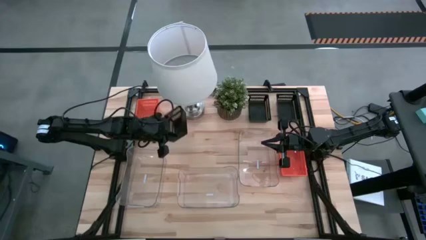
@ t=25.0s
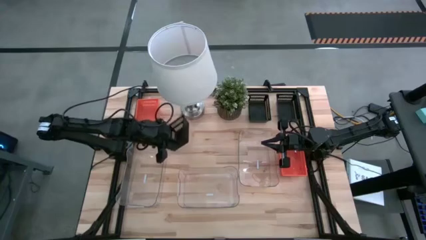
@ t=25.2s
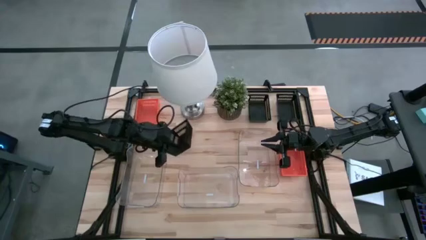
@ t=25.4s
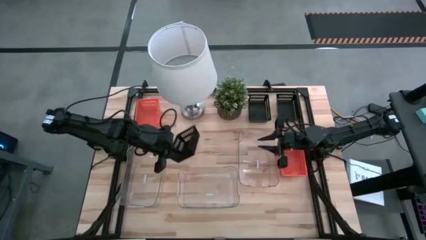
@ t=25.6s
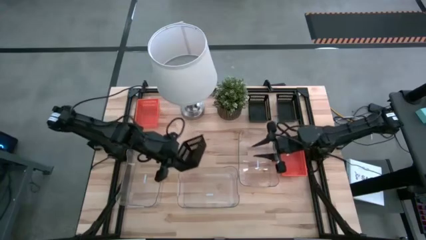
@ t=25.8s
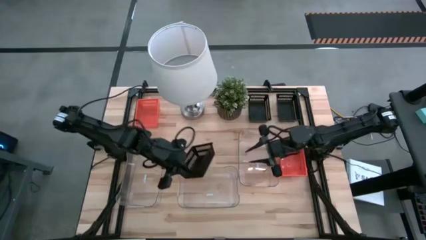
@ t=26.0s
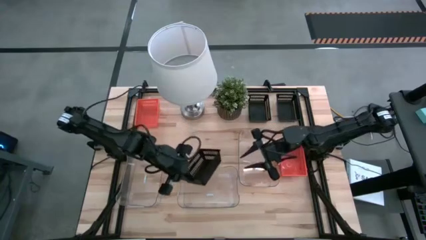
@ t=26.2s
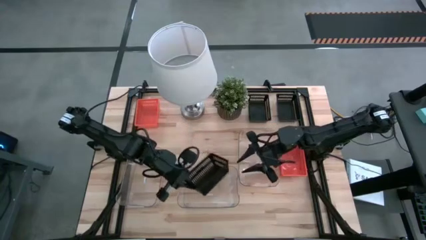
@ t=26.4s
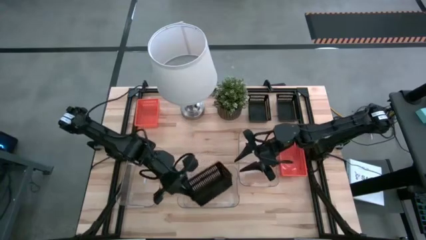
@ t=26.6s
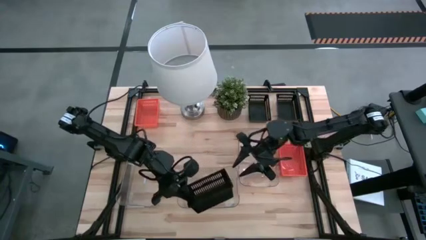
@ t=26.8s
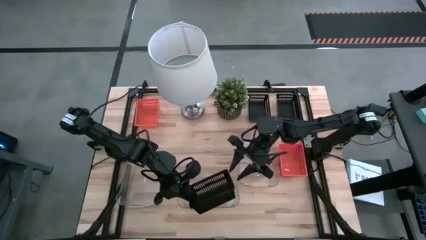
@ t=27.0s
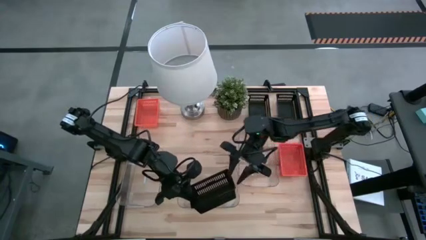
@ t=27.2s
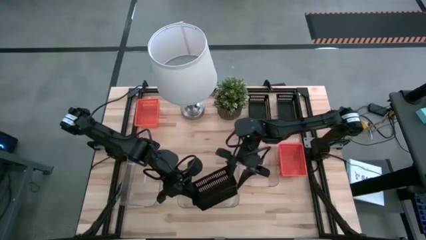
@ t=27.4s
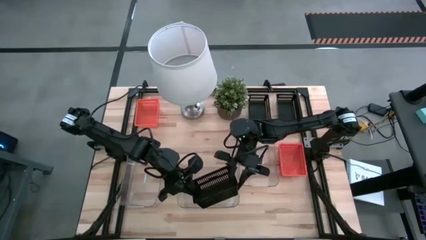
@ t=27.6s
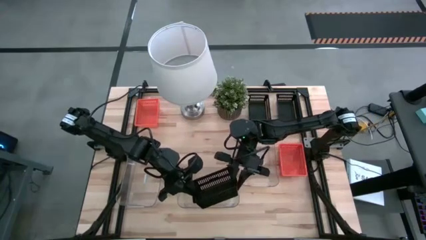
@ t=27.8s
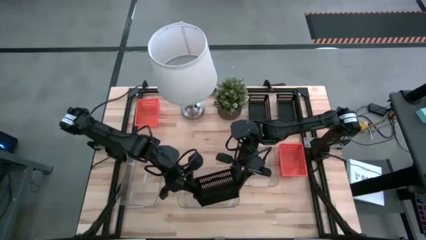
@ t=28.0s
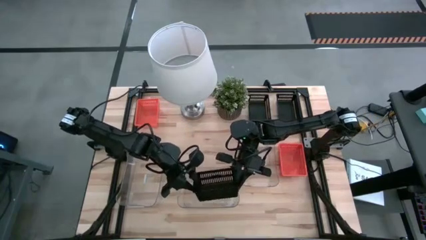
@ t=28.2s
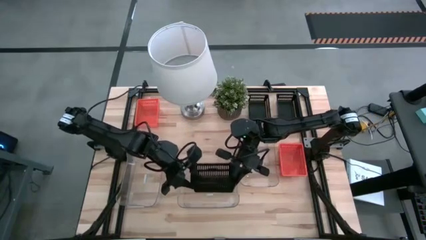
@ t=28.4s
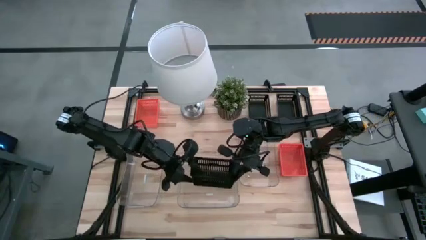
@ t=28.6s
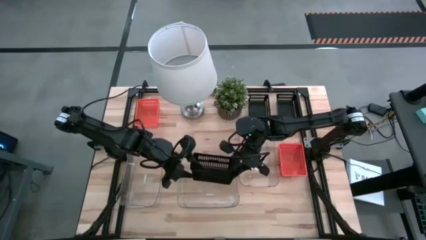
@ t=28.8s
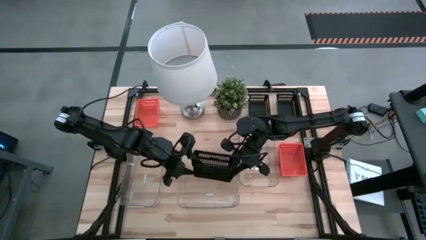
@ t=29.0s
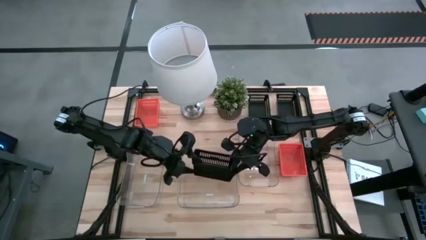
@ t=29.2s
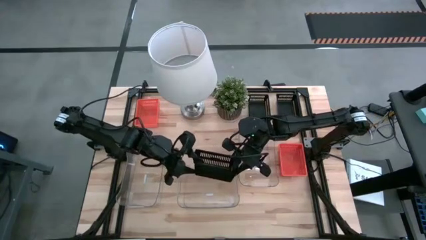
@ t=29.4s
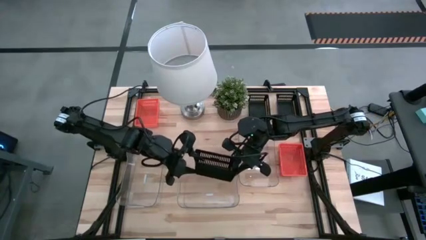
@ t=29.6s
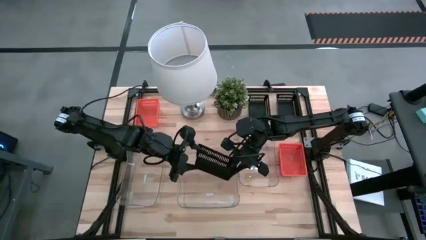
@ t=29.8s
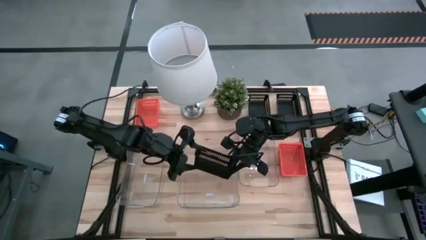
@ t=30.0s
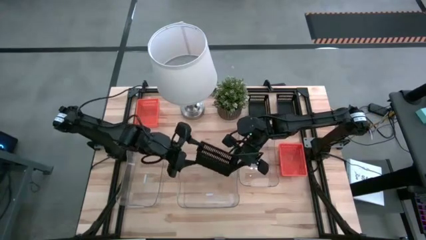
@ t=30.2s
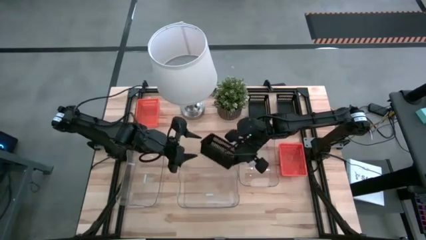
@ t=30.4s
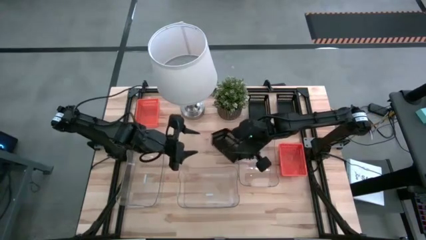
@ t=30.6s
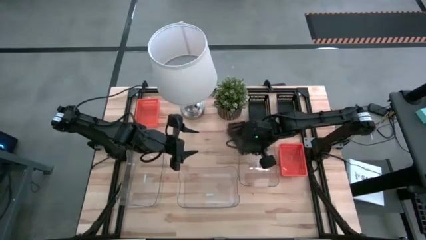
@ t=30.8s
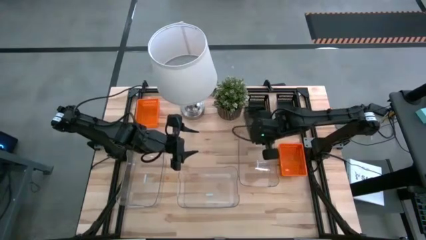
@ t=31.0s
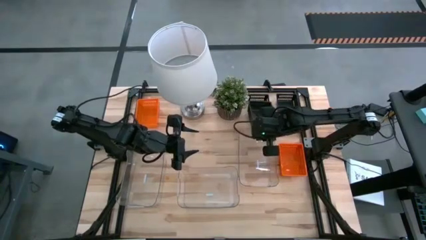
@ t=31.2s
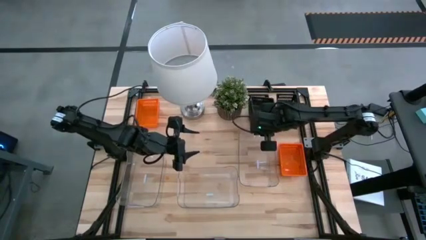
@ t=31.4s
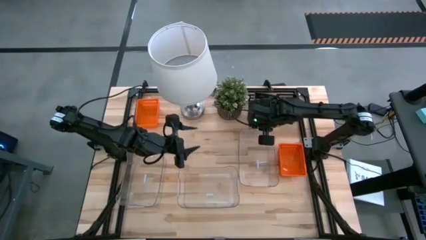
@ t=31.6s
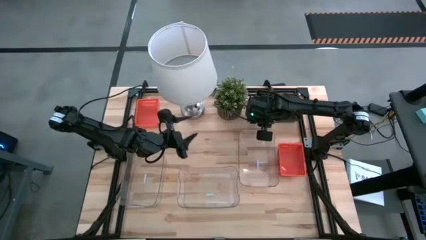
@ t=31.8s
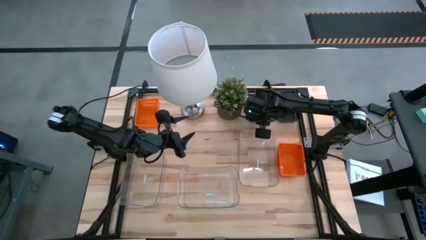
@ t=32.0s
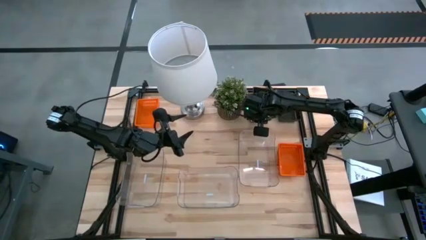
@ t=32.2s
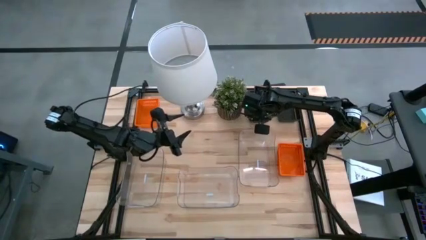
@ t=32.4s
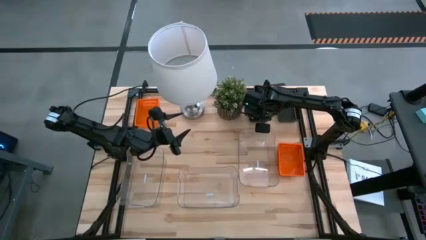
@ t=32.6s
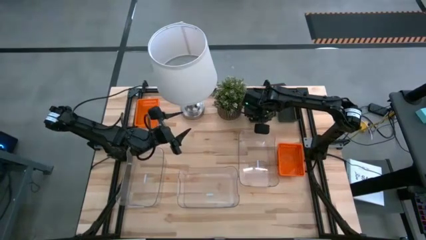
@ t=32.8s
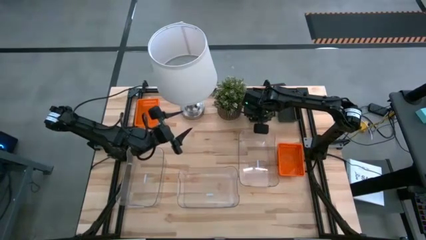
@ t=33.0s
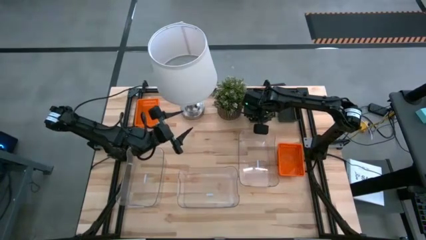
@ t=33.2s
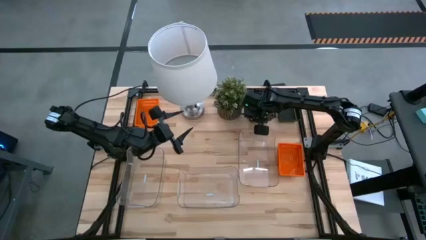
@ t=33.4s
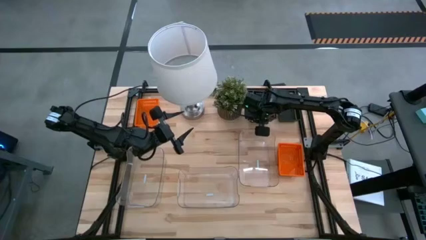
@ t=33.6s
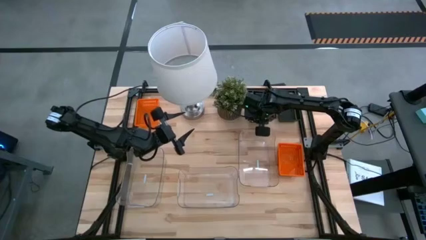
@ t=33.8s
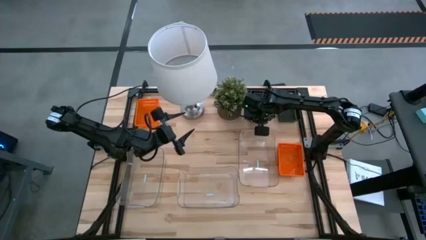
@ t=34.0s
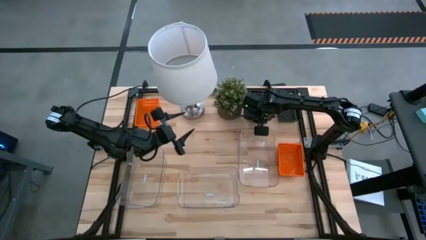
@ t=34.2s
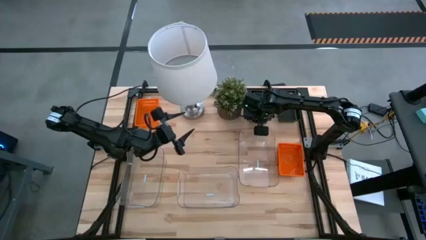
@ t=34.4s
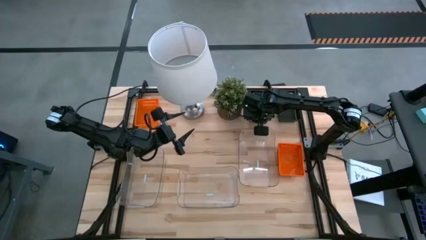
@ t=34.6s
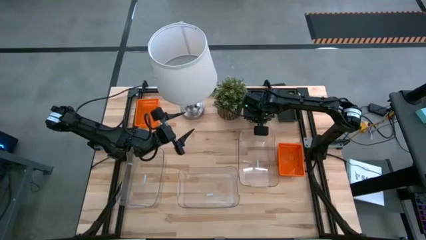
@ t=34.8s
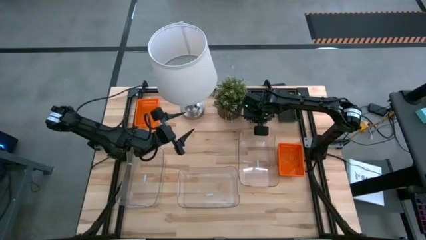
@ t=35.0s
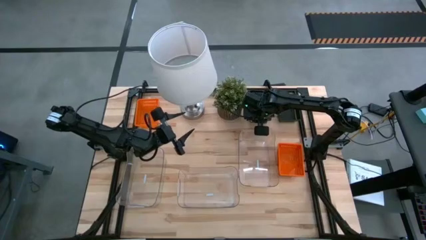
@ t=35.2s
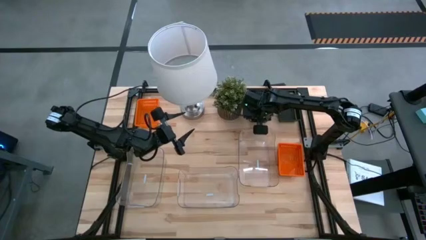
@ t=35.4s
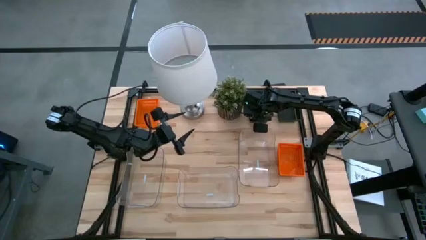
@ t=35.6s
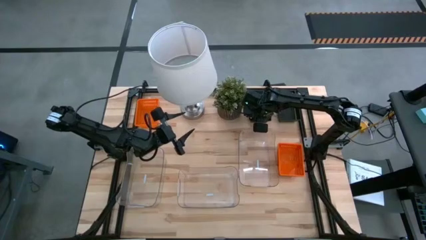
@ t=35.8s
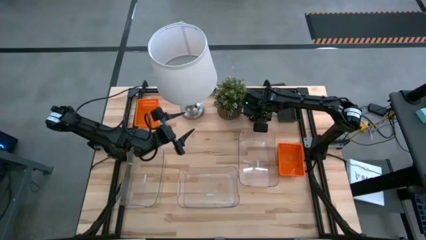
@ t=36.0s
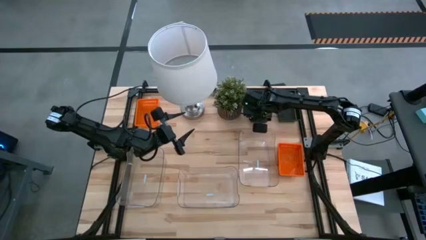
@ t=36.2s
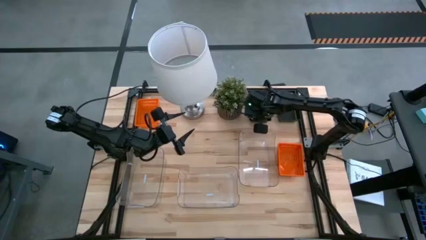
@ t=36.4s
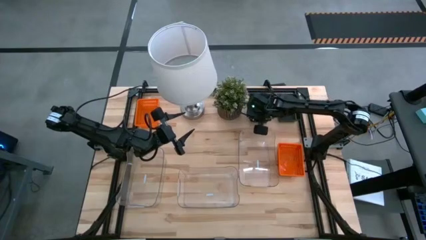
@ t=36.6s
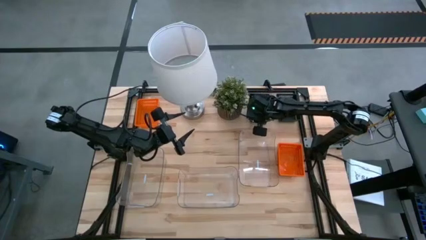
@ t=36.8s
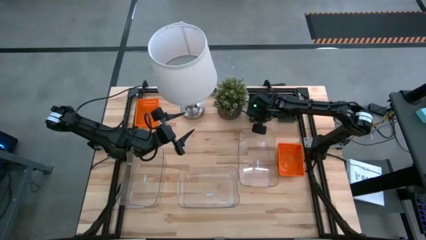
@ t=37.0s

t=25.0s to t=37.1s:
Stack the left black bin on the top left black bin
